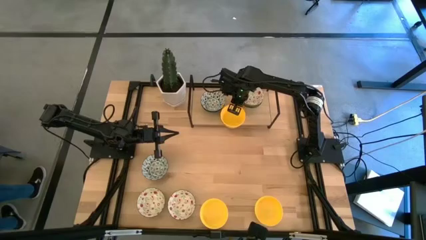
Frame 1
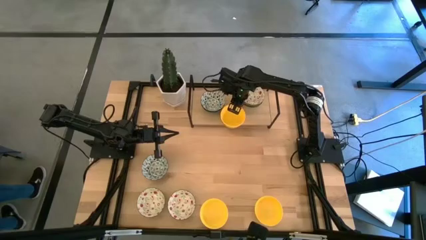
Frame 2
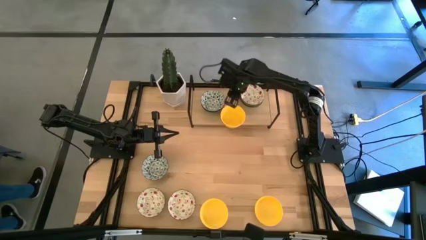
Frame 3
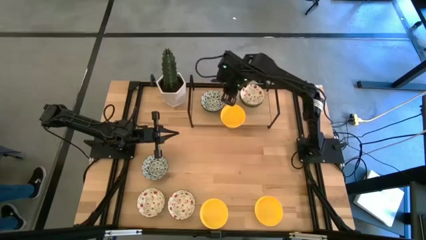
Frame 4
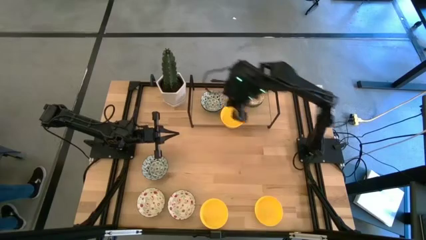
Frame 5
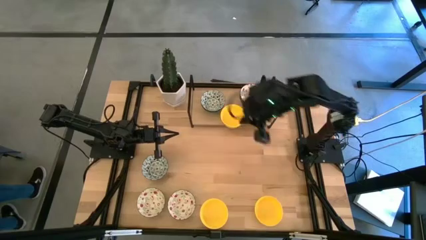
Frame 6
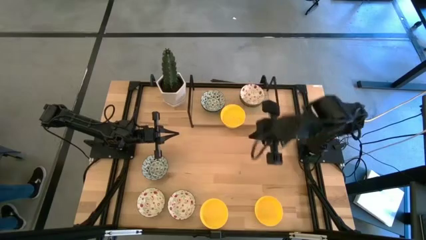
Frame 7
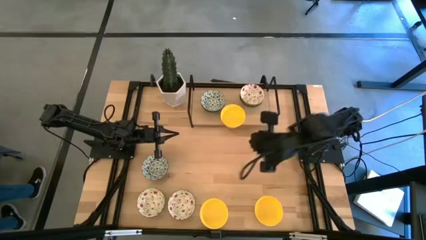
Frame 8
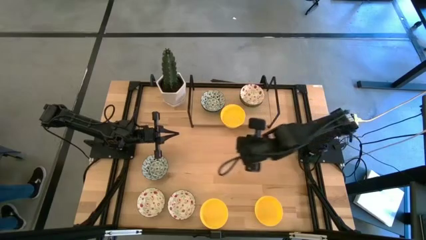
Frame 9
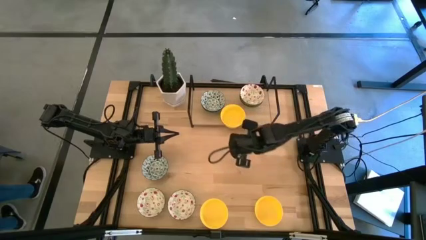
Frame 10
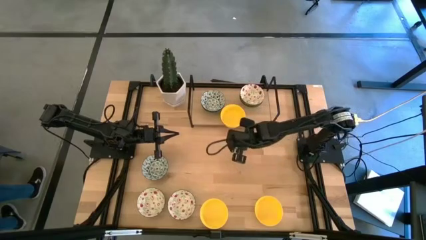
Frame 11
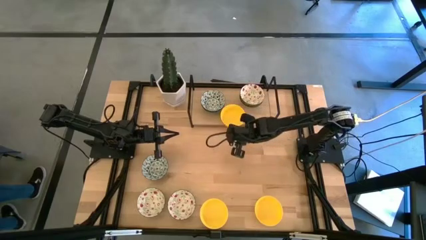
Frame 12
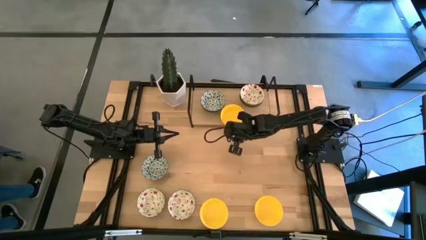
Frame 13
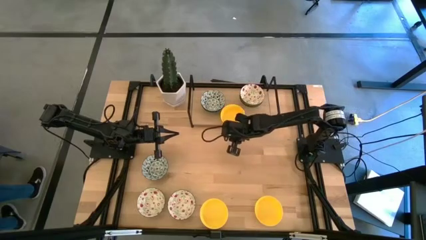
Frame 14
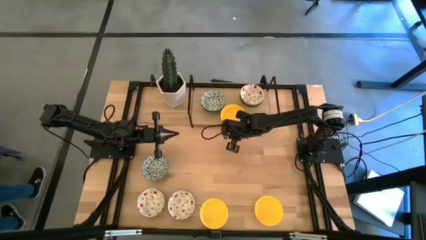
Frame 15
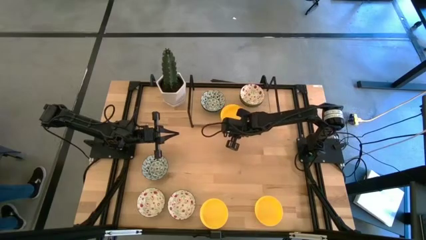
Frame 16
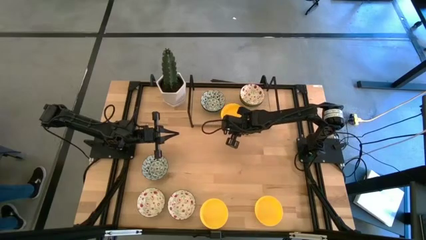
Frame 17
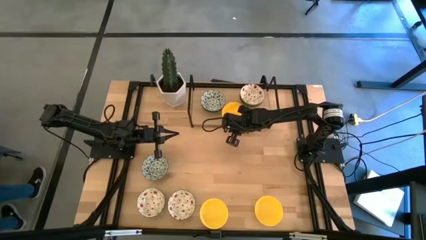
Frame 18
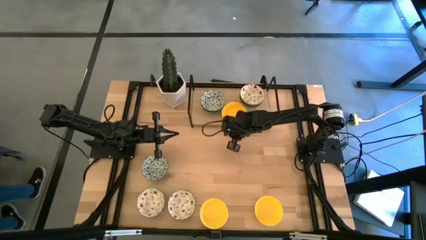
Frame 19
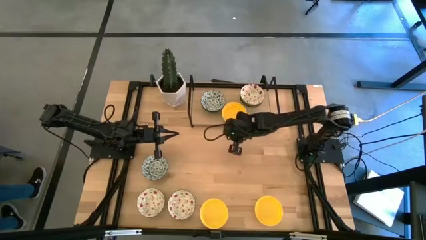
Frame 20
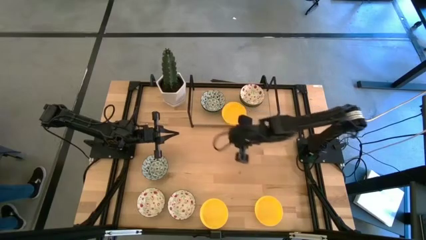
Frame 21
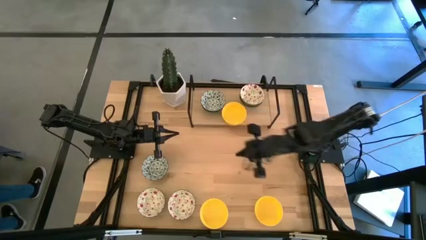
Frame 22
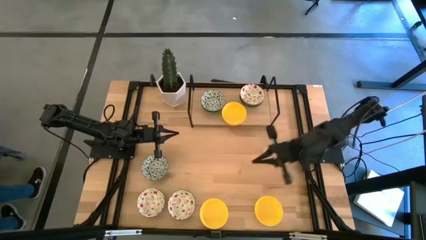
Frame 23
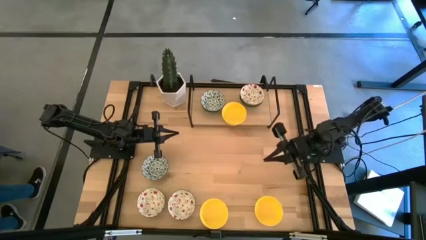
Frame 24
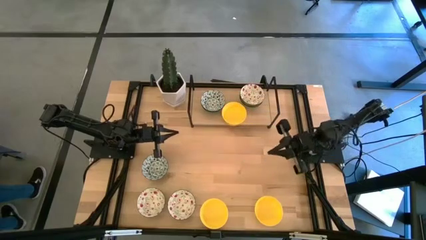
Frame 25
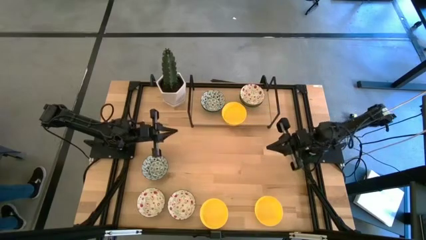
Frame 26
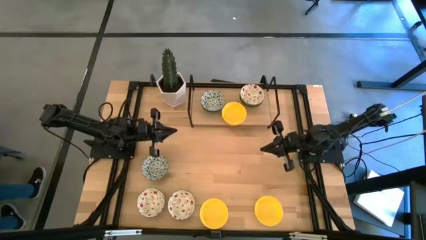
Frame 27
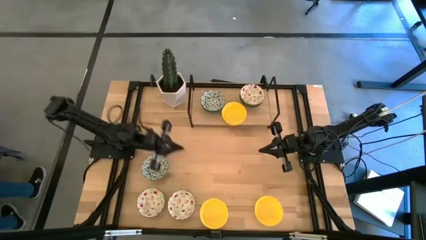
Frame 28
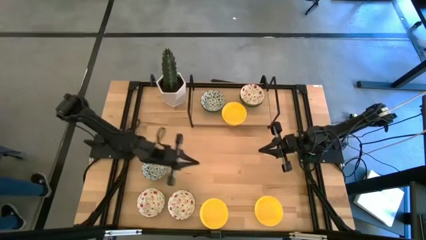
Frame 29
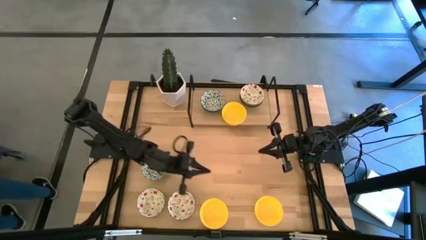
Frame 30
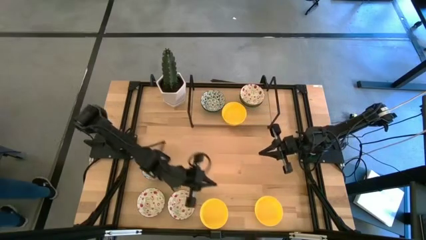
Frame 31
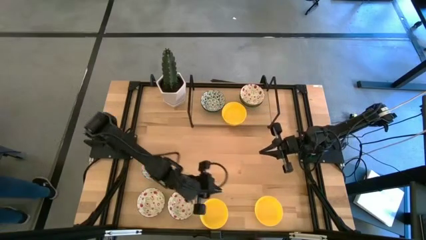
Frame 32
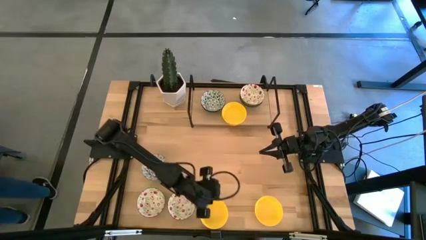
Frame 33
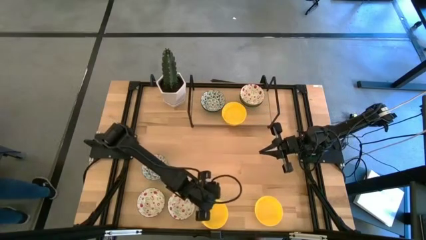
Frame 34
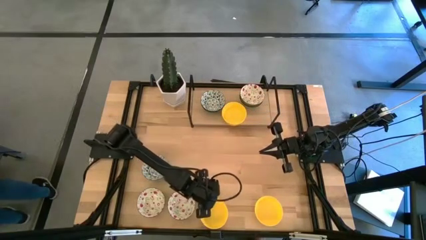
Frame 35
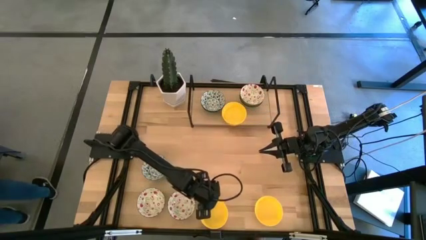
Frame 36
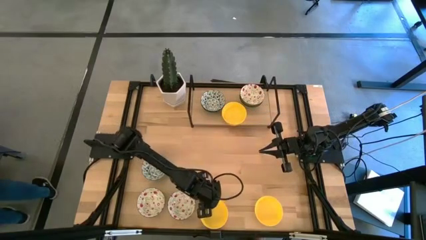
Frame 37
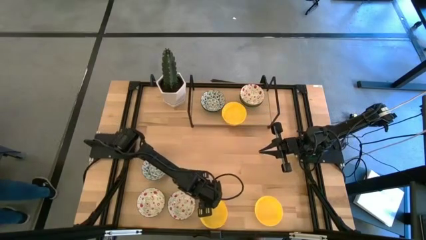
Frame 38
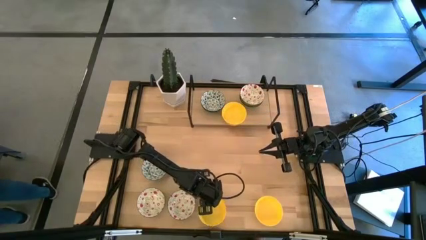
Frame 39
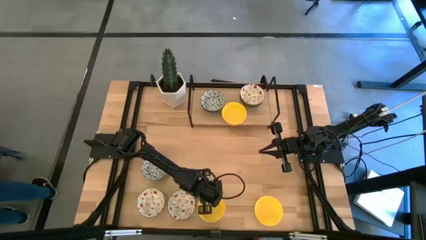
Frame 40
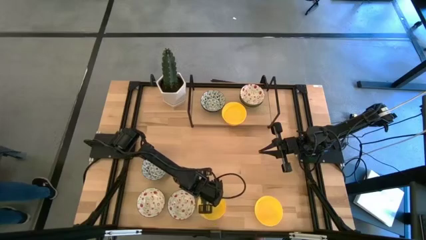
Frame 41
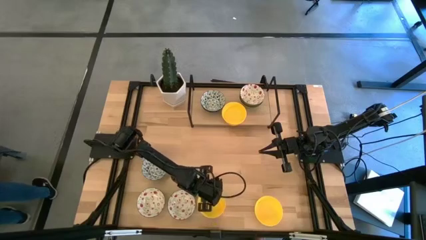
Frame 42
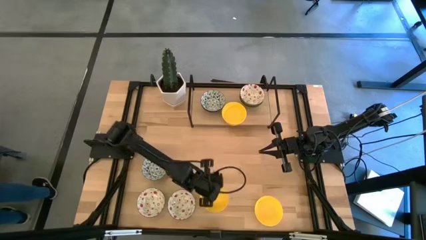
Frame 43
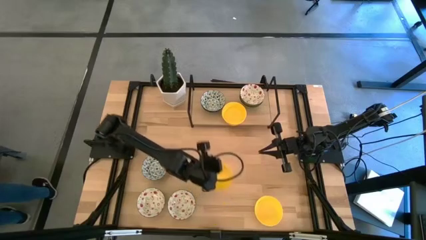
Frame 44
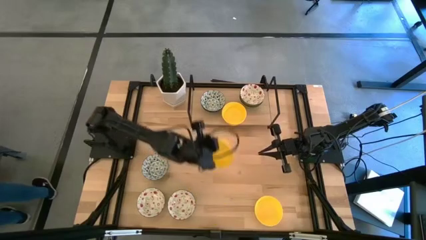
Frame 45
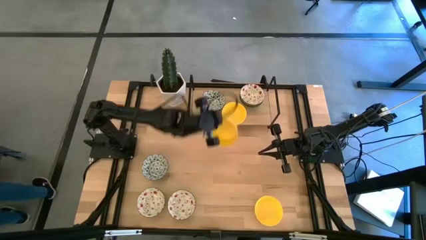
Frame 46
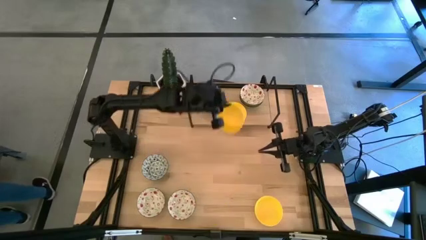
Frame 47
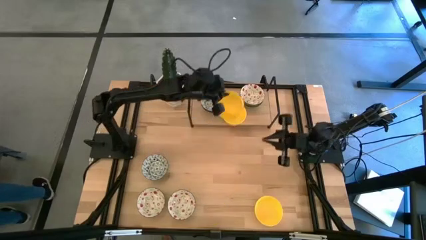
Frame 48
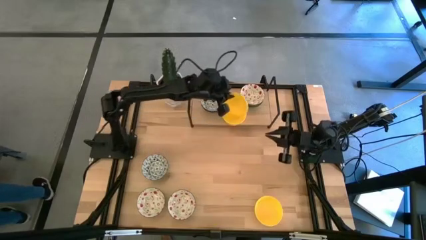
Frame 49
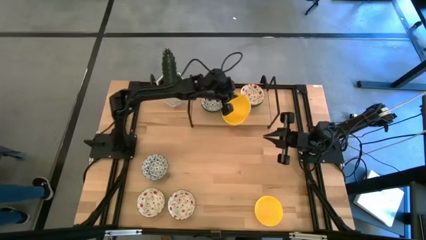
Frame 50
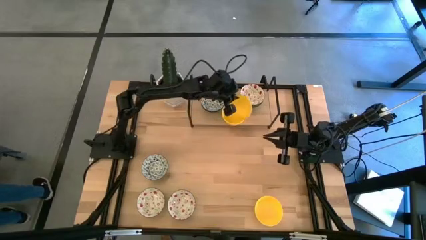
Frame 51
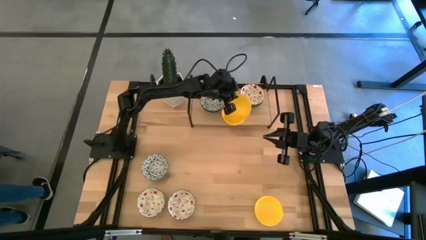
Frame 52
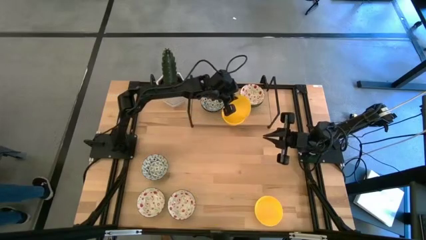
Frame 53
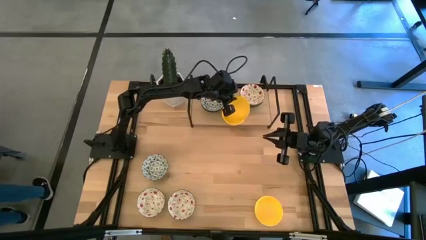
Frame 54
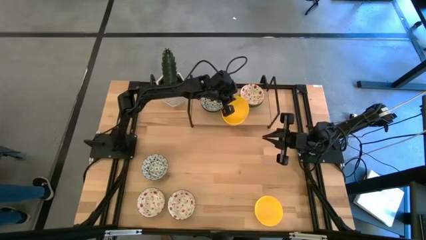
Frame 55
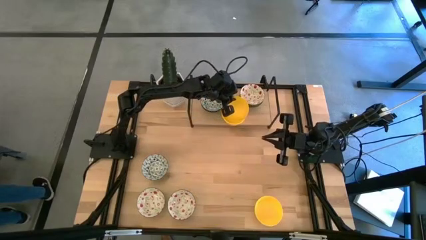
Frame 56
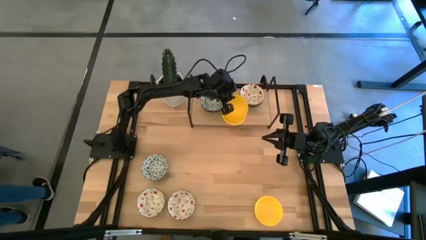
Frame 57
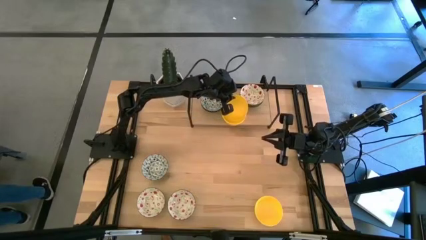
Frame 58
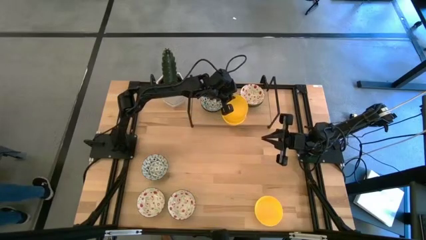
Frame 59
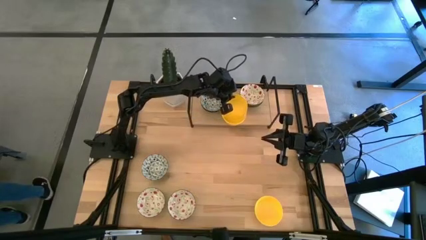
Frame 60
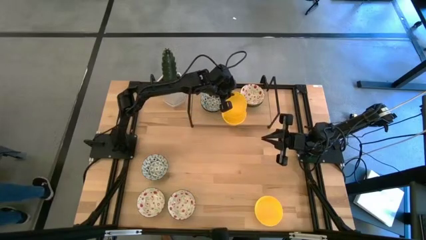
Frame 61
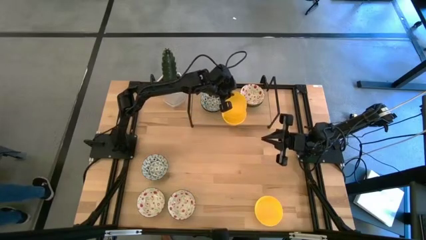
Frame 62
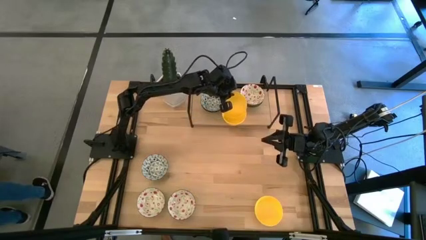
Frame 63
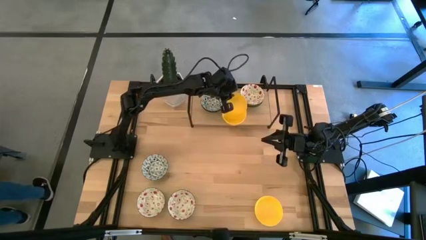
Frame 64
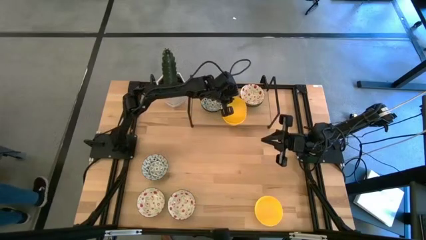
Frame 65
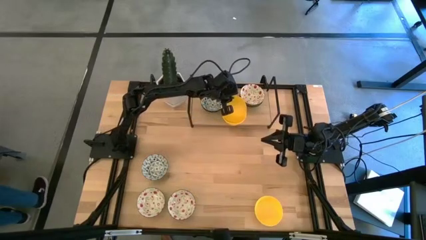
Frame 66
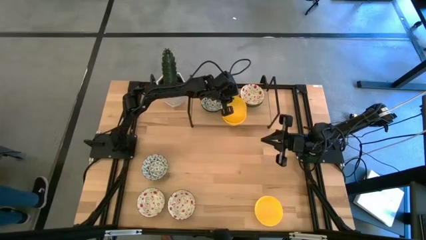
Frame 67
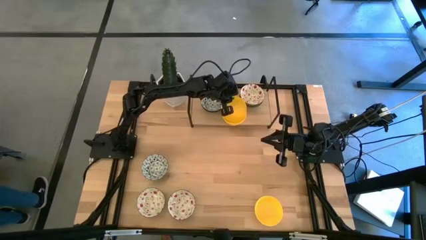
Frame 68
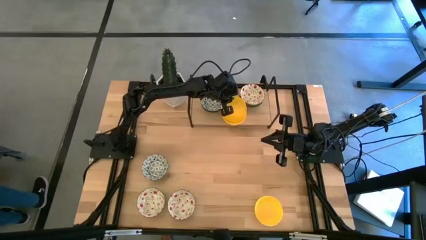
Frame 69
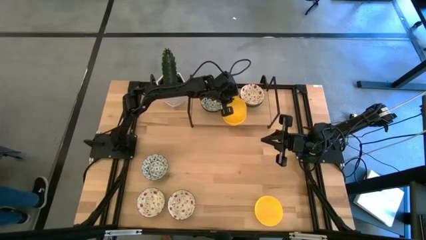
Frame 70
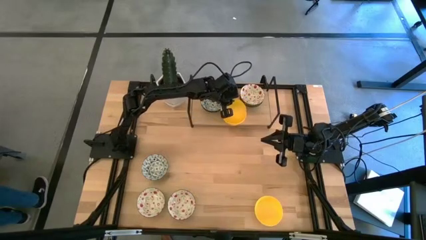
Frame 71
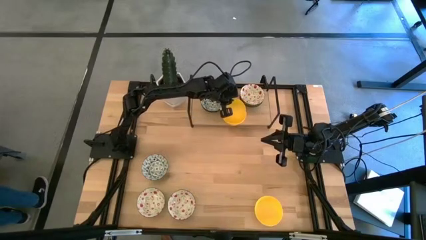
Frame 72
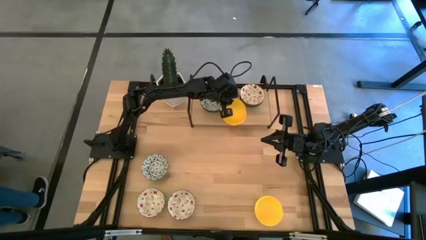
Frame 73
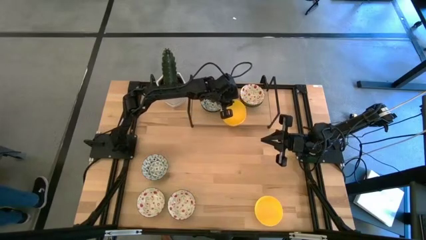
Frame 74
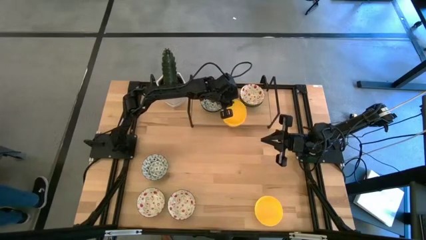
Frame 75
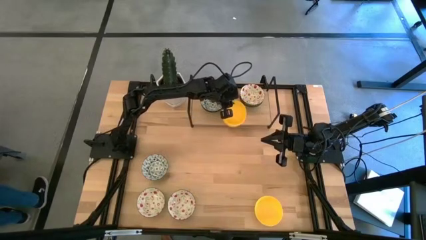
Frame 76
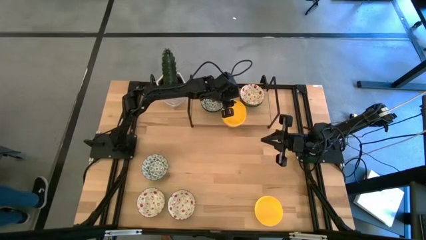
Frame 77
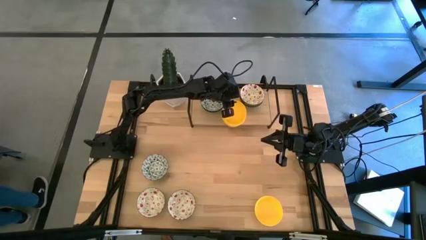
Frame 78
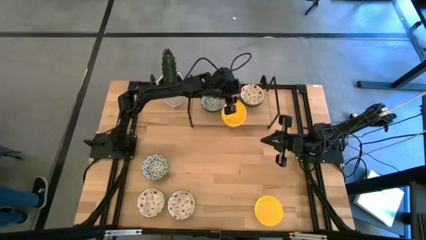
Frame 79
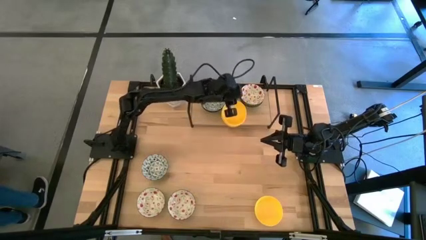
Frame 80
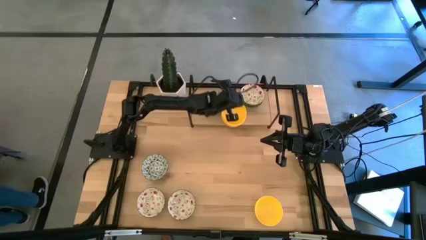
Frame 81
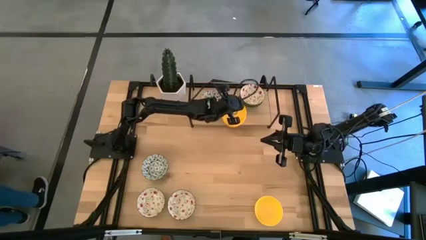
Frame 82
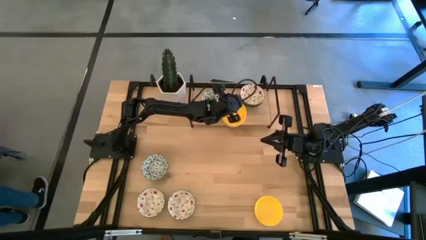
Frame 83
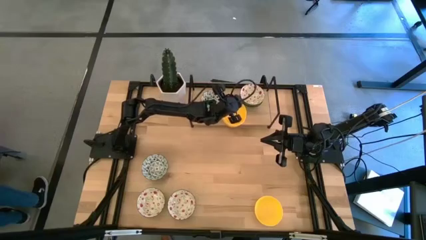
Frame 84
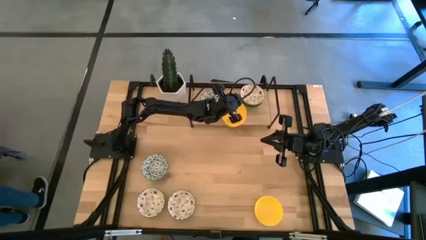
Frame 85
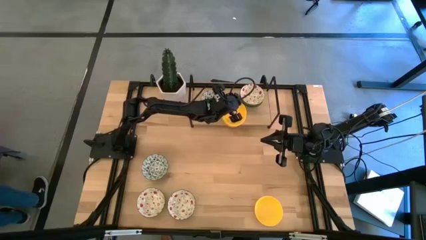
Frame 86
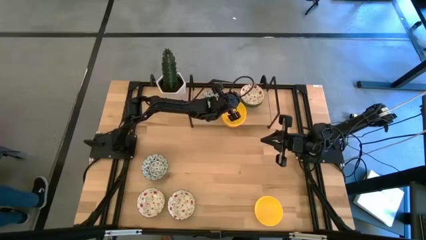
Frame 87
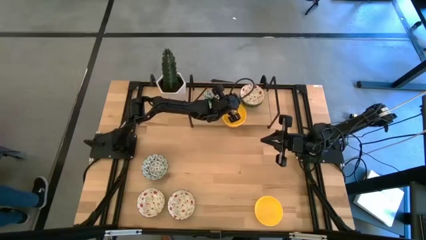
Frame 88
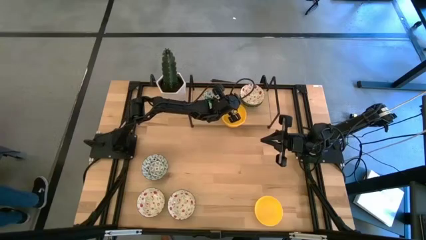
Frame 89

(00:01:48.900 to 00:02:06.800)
Task: Pick & Place Mini bowls
Stack the yellow bowl on top of the yellow bowl on the shelf
